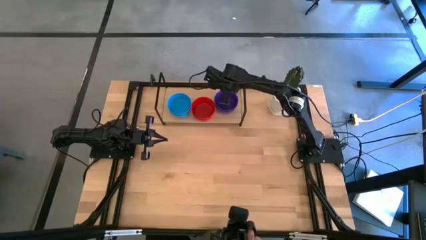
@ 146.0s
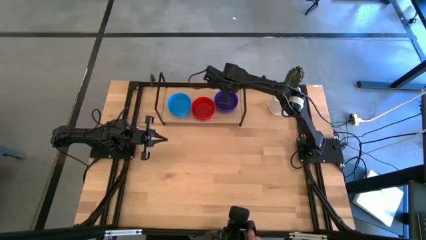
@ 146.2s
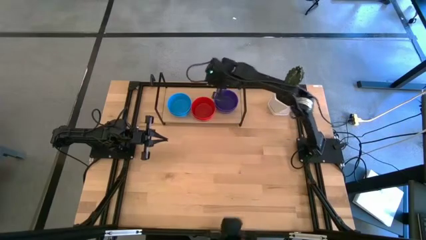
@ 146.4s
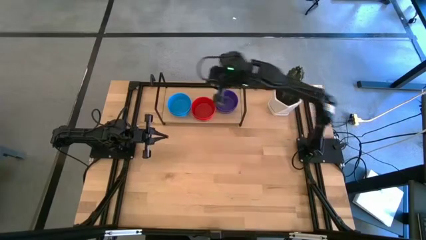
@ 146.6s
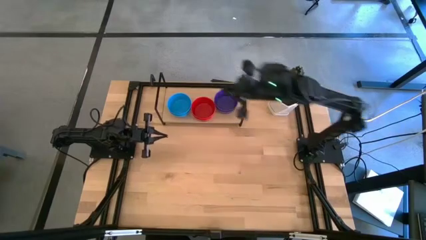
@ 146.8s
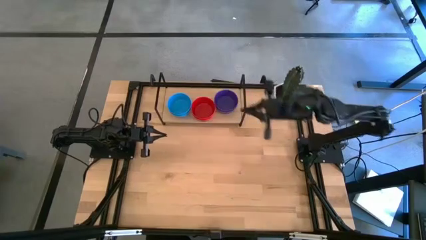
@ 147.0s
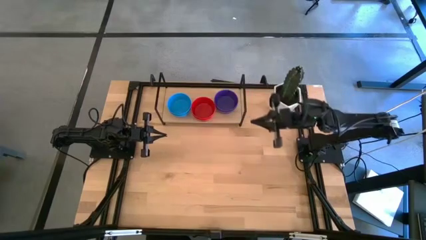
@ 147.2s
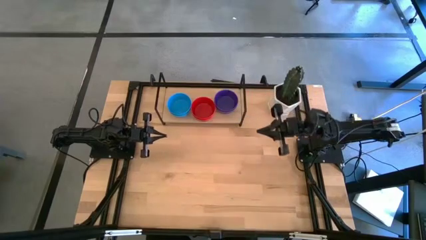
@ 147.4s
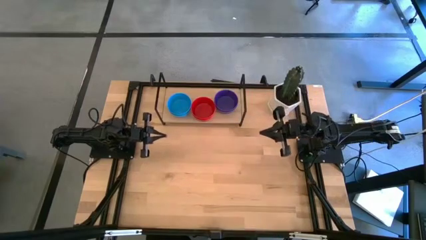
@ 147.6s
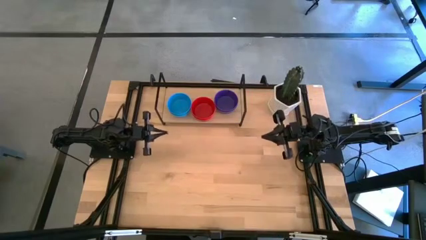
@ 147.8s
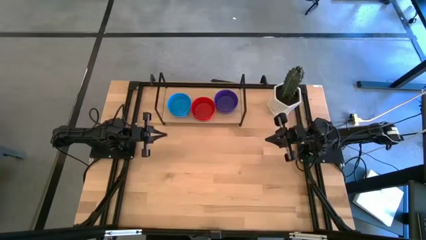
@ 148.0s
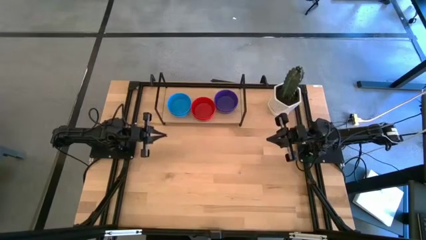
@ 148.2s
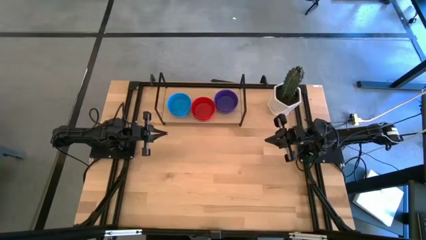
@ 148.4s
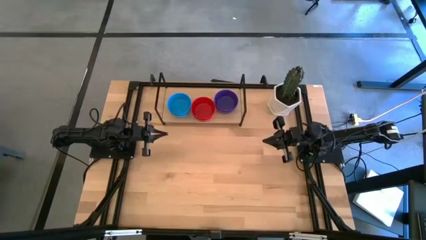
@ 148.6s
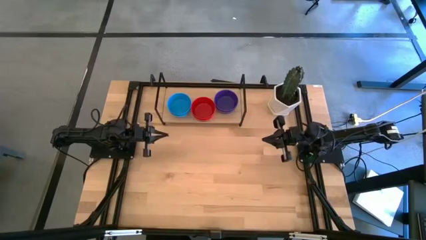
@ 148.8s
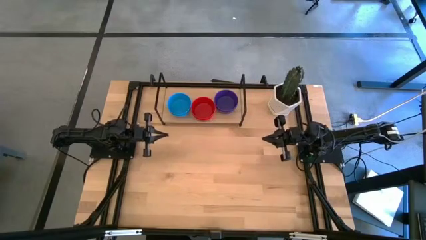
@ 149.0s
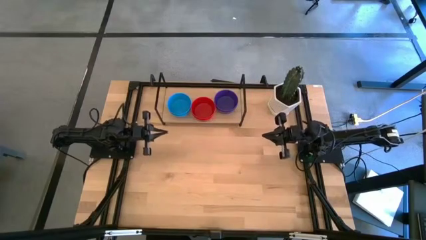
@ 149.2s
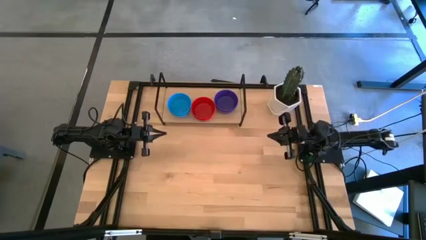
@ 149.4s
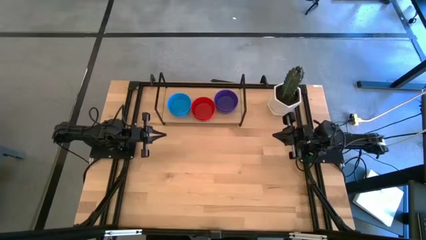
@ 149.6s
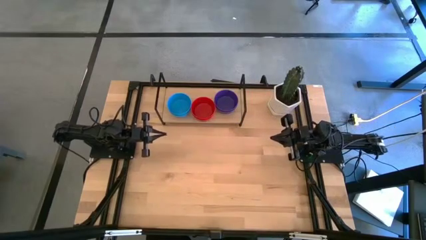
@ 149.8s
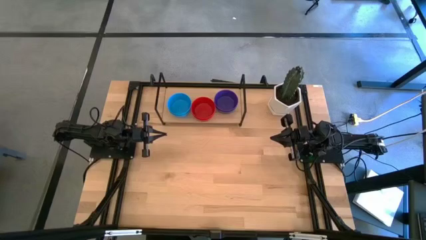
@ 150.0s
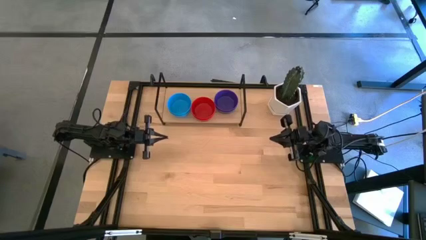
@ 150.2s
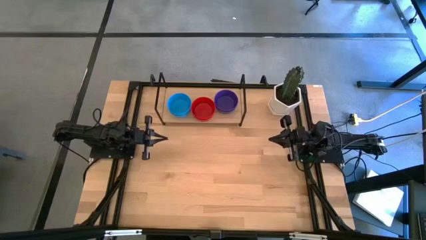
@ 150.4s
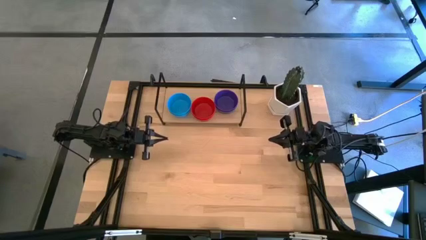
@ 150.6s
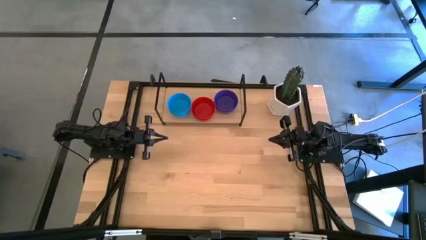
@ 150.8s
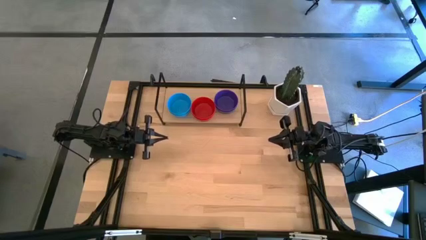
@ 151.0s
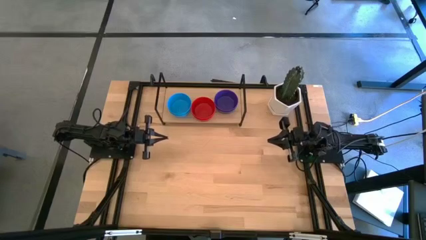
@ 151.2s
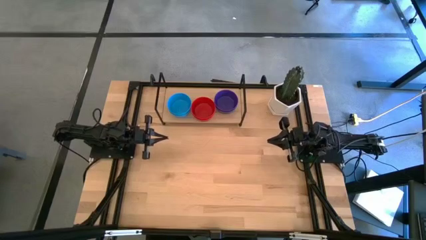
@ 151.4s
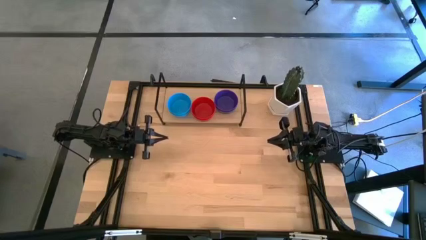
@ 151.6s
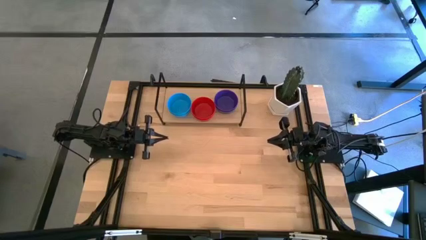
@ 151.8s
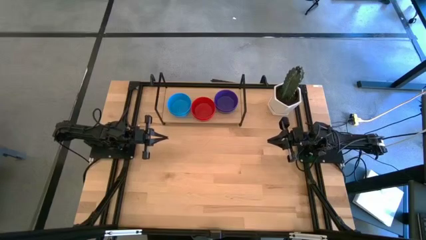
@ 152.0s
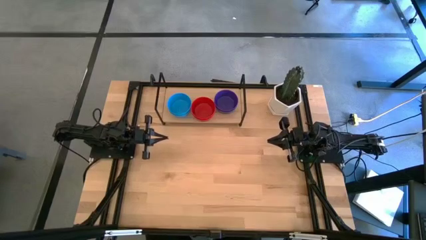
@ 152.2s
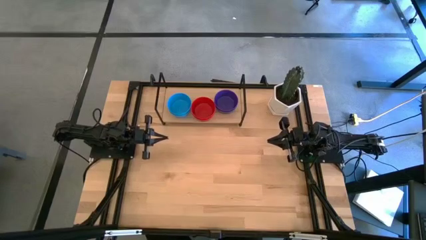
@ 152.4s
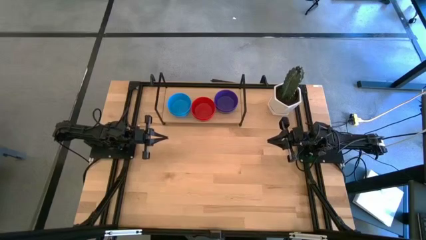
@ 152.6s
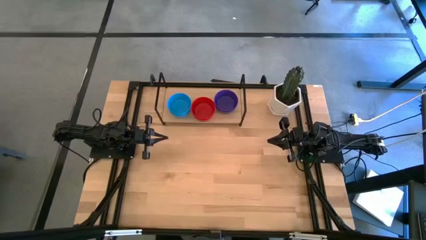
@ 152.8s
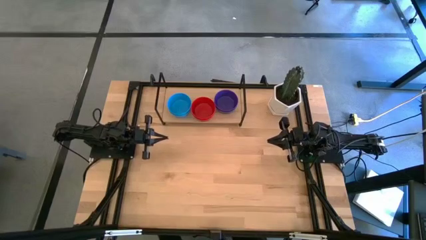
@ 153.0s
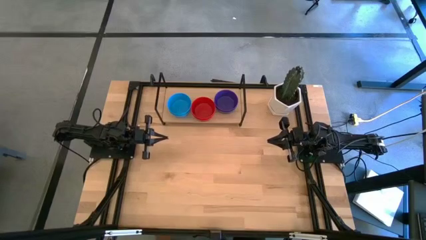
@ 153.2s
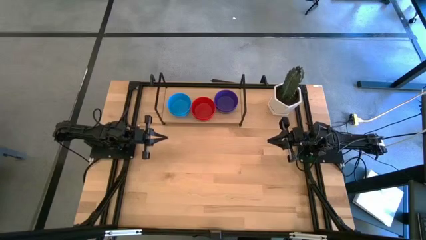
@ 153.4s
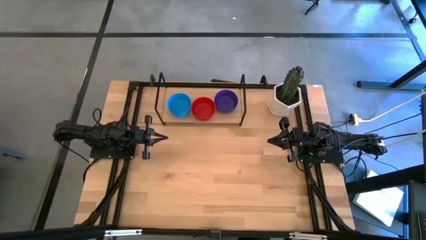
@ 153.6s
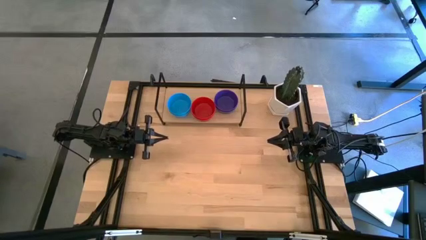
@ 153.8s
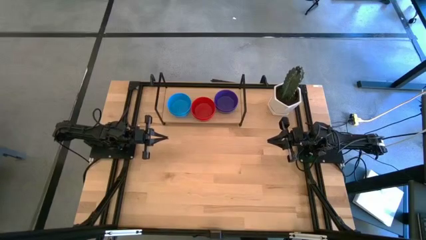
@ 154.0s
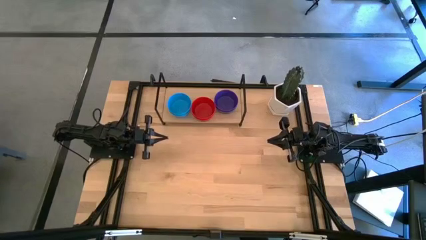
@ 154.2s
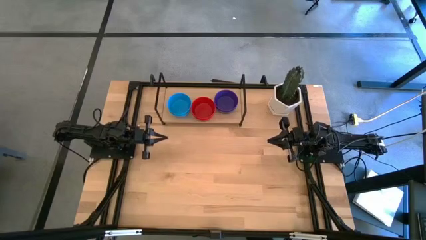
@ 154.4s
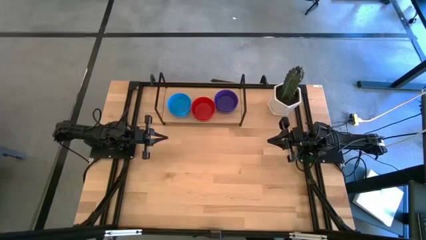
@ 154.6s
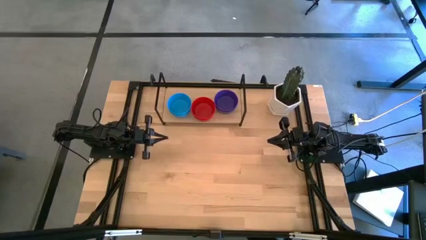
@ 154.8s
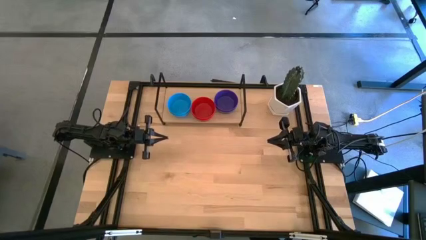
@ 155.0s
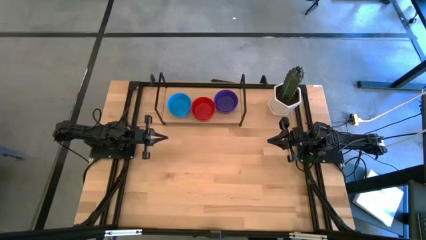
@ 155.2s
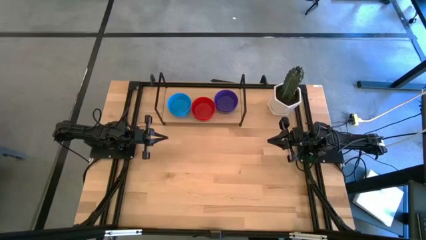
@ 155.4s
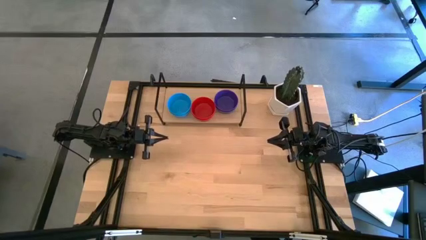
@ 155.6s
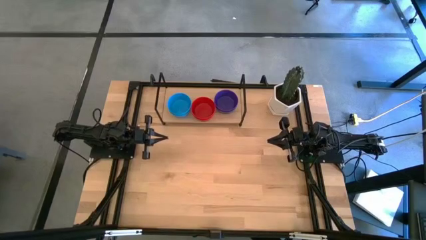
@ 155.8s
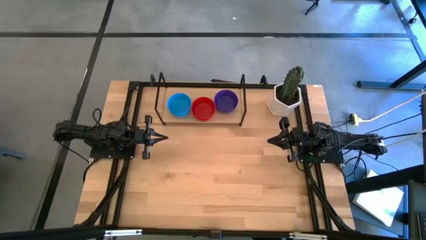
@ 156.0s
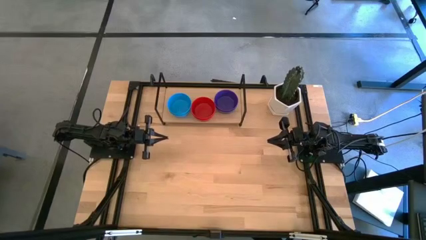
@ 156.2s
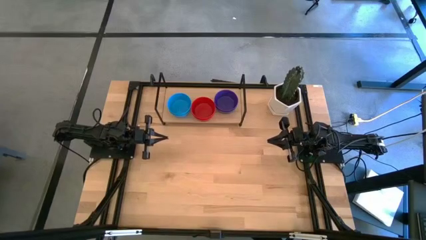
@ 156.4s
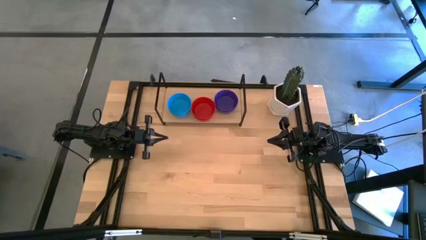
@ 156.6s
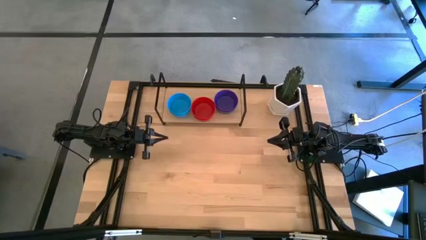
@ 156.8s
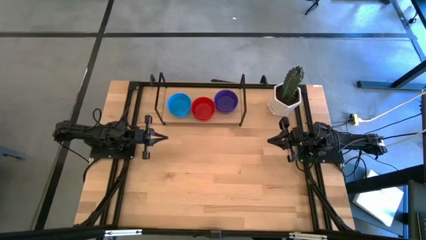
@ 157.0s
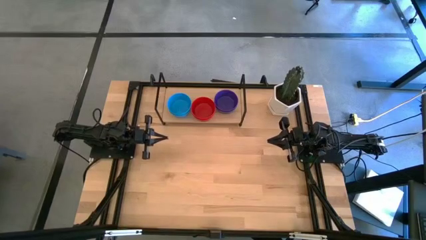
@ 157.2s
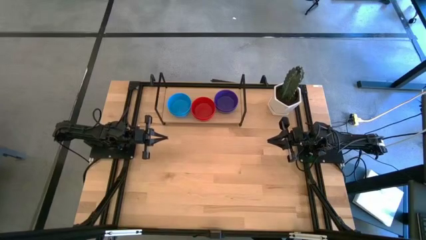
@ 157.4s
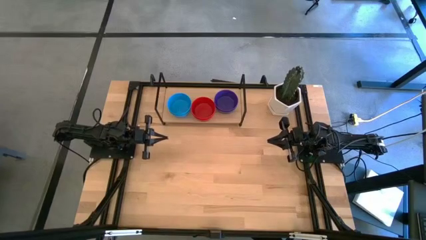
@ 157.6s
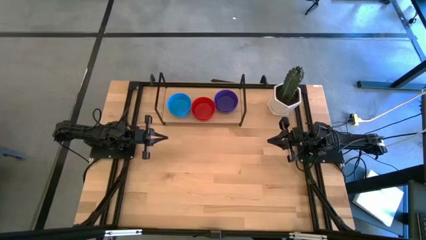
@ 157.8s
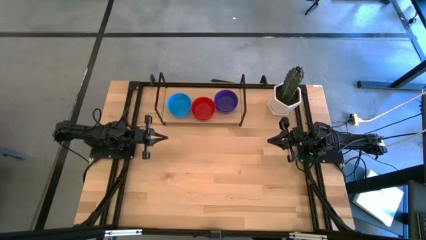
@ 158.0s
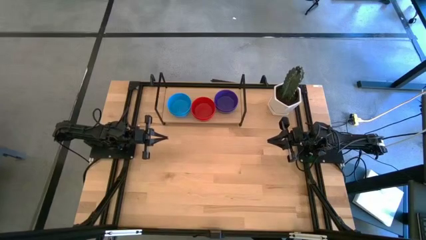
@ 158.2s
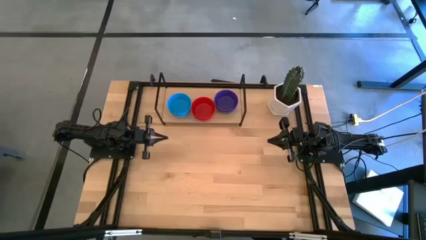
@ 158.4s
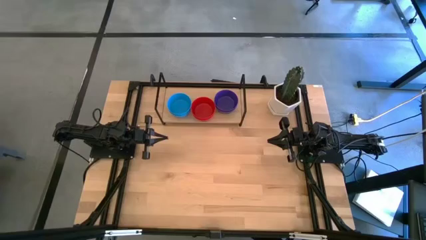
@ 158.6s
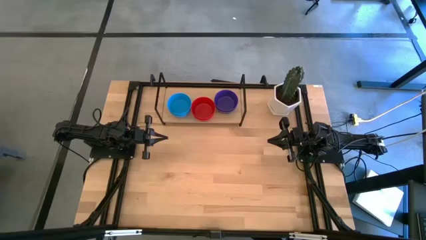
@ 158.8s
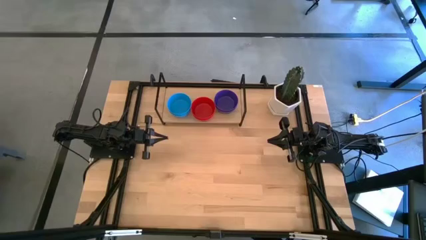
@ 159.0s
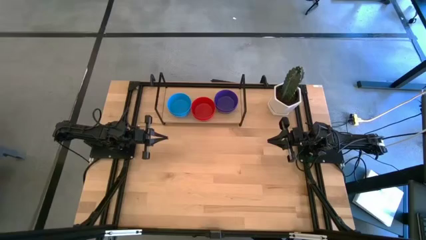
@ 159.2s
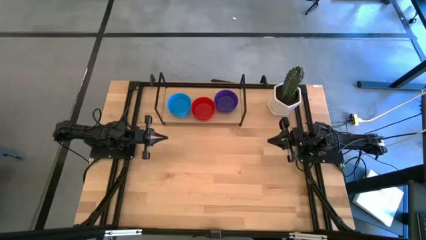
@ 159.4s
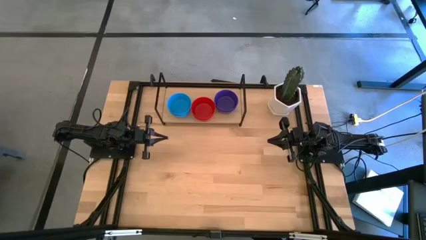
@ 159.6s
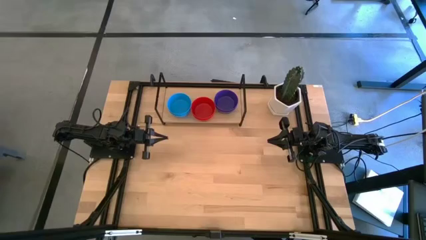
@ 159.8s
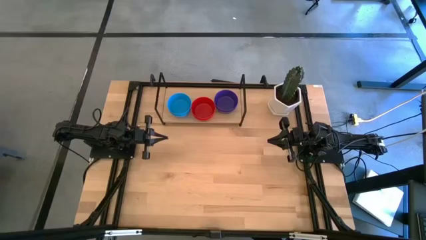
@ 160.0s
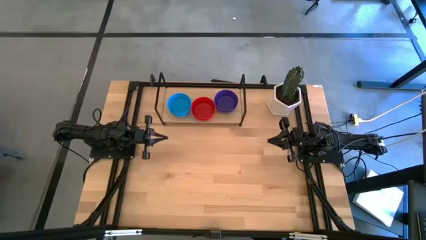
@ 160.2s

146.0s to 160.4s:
Task: Pick & Place Mini bowls
Return to Home Position

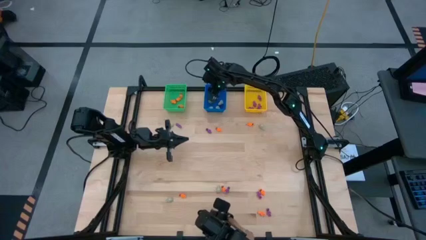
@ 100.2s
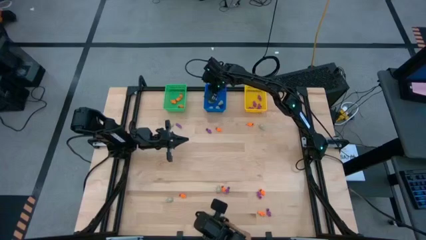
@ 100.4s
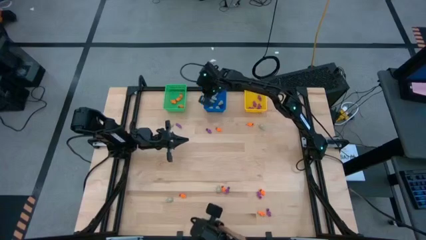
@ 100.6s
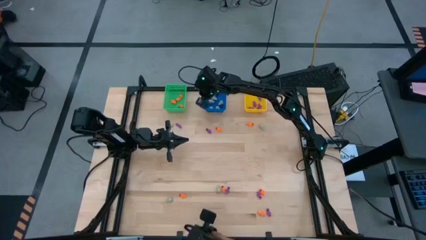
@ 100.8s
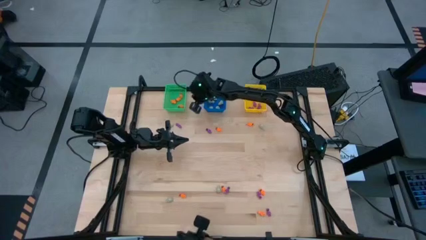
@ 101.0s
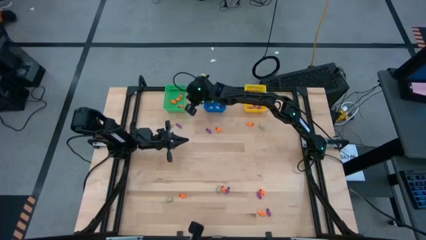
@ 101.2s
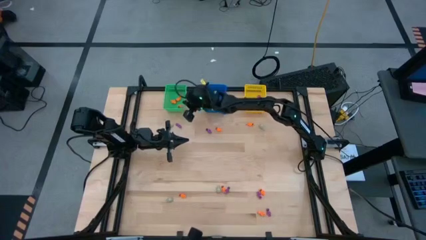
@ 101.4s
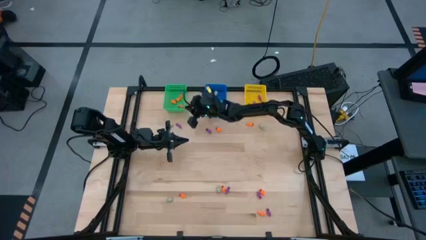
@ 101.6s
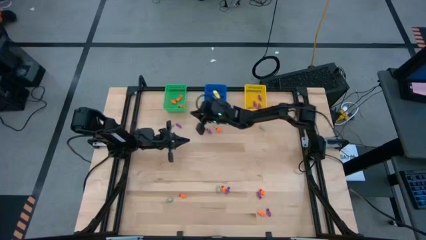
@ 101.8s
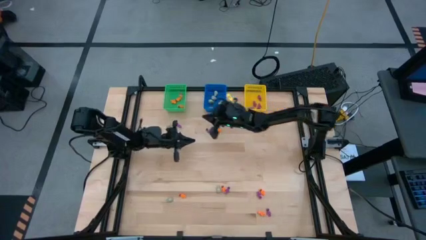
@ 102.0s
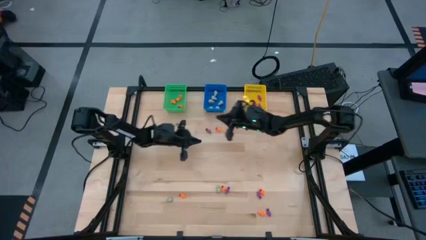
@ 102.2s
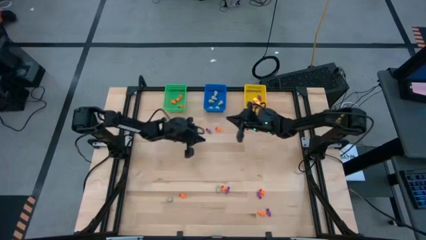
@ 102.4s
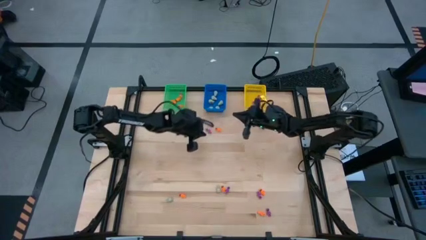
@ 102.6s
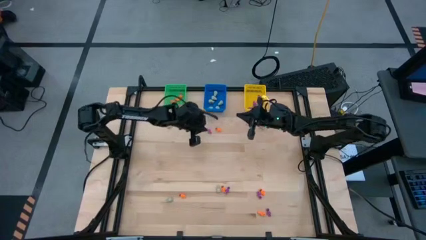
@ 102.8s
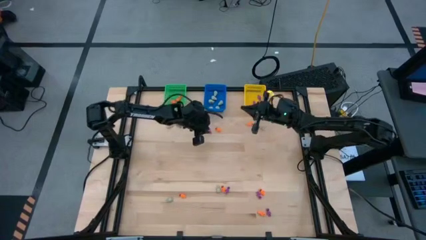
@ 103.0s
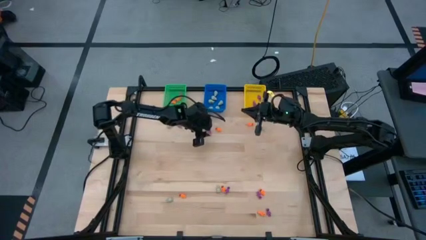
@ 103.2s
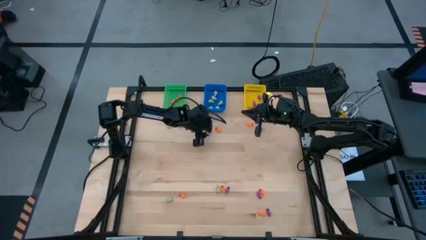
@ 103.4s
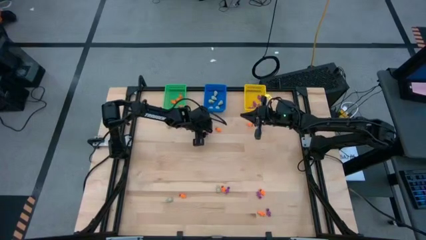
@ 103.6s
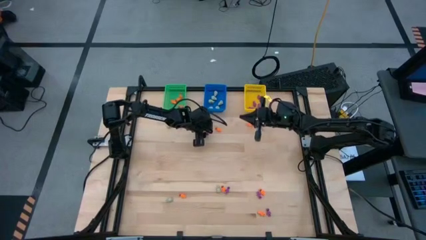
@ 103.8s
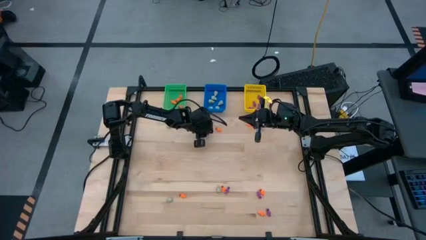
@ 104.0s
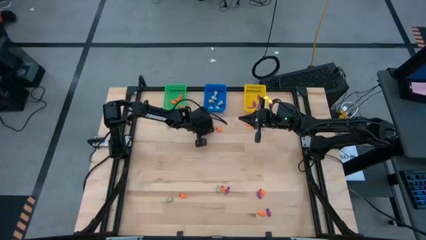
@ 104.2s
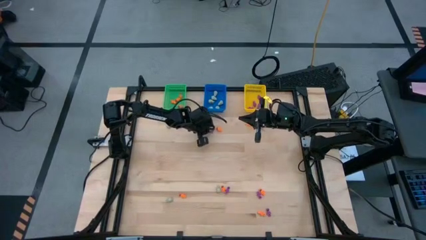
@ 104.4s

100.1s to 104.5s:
Task: Sort Halloween decoration
Put the purple skeleton toy into the yellow bin
